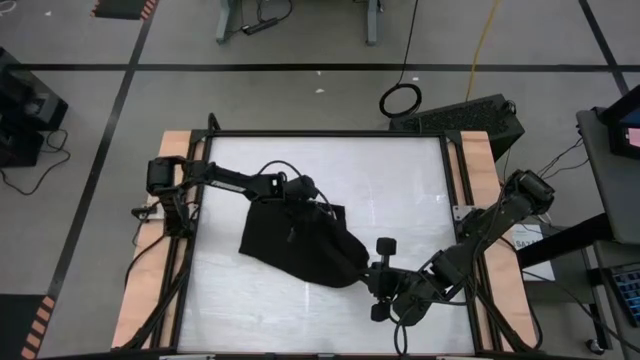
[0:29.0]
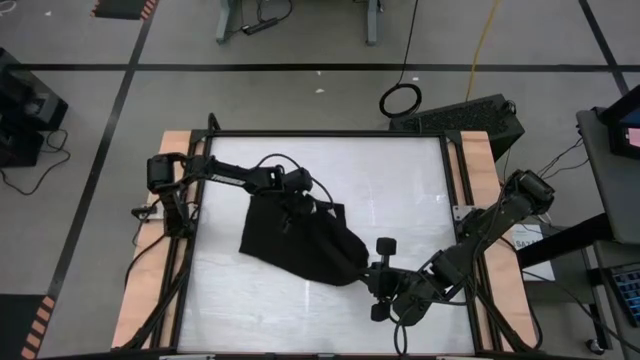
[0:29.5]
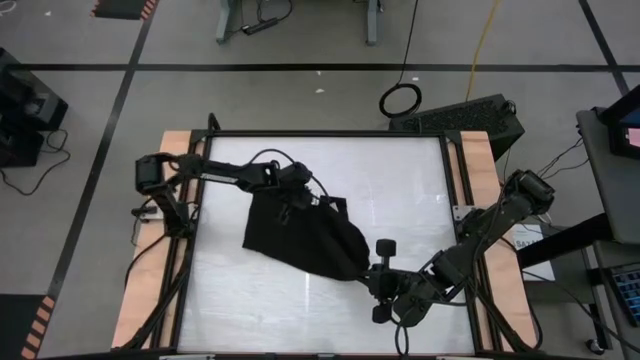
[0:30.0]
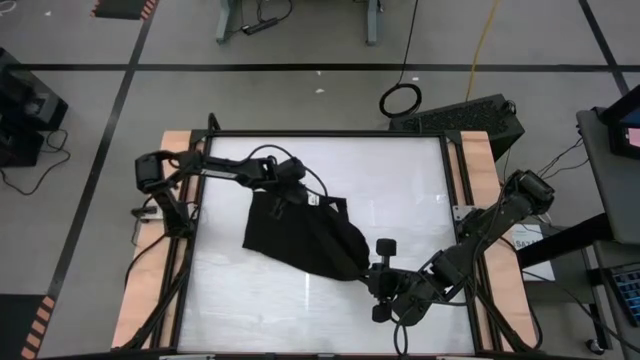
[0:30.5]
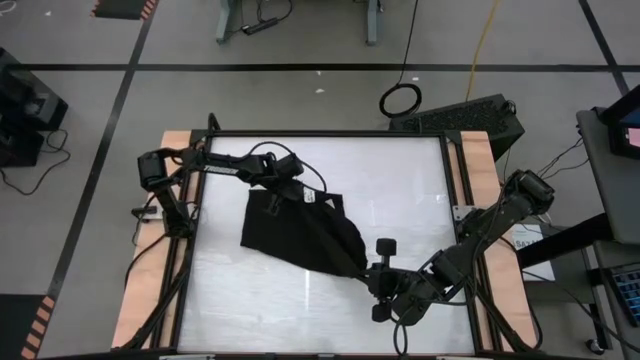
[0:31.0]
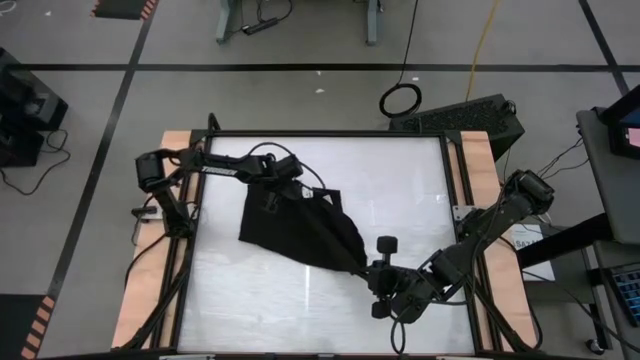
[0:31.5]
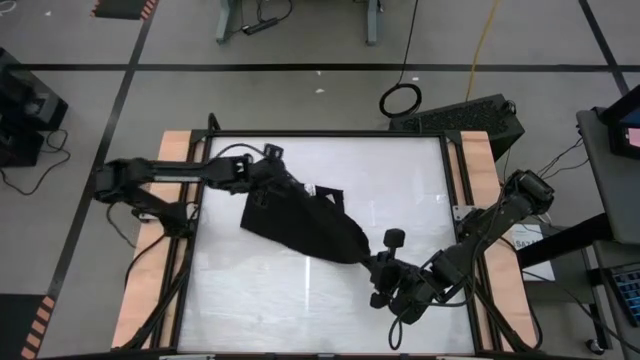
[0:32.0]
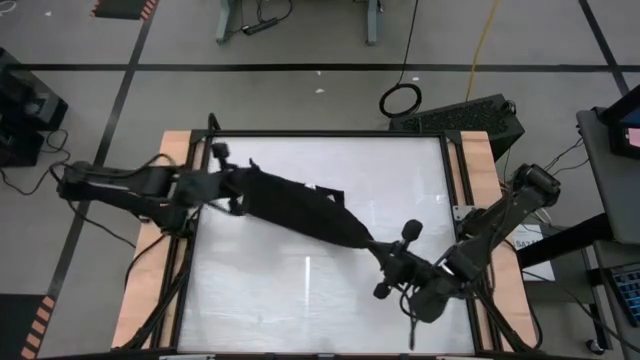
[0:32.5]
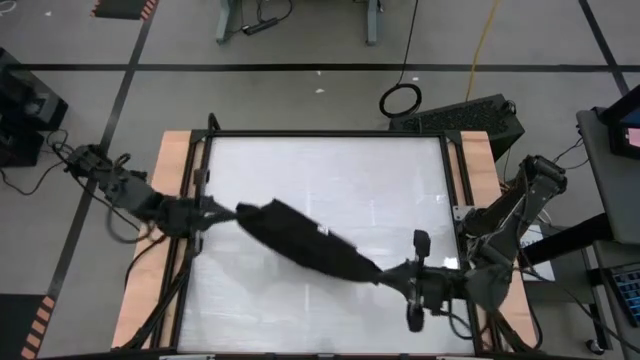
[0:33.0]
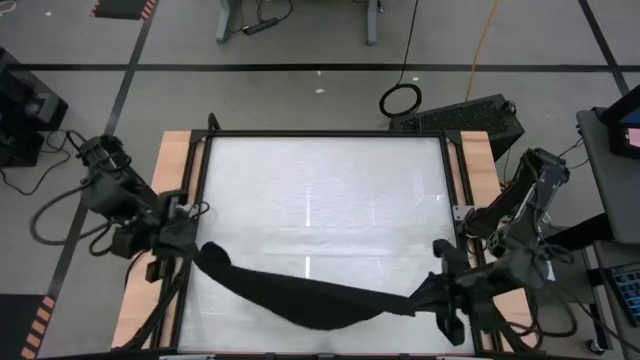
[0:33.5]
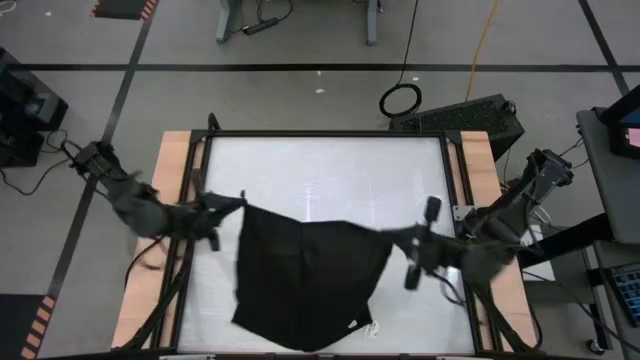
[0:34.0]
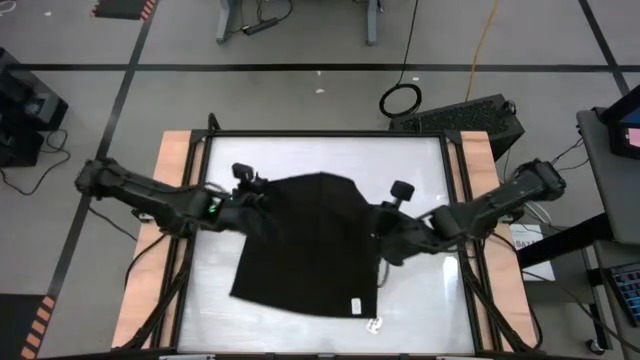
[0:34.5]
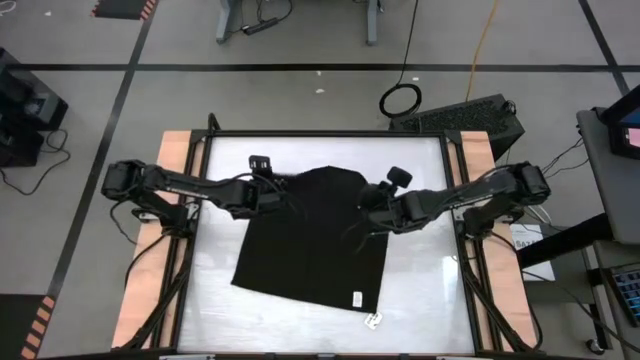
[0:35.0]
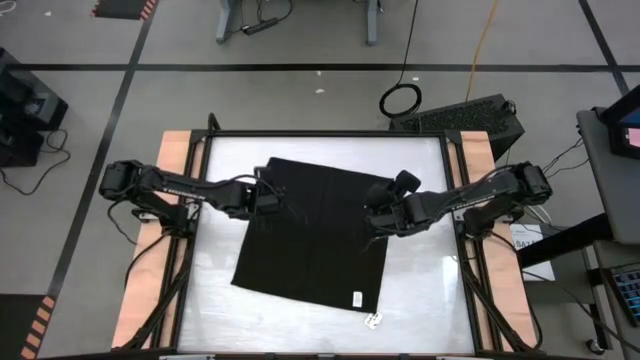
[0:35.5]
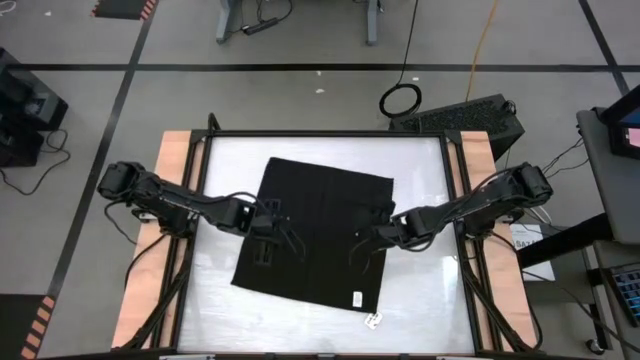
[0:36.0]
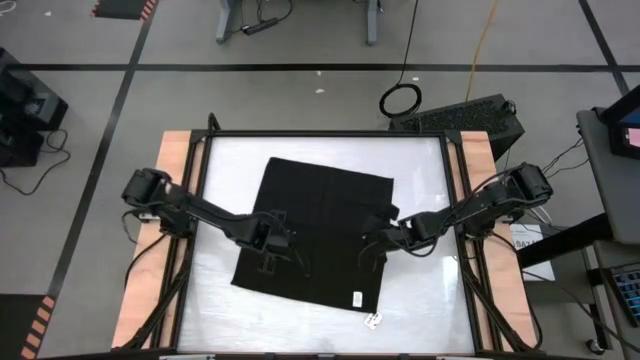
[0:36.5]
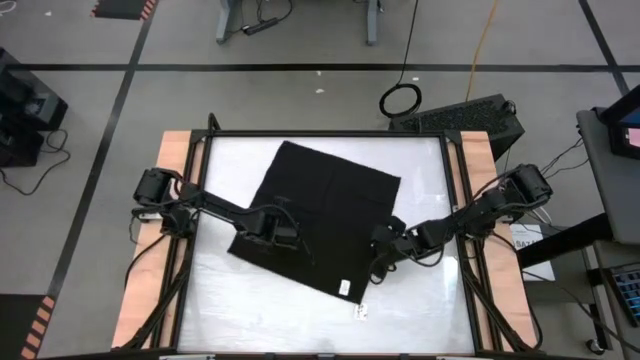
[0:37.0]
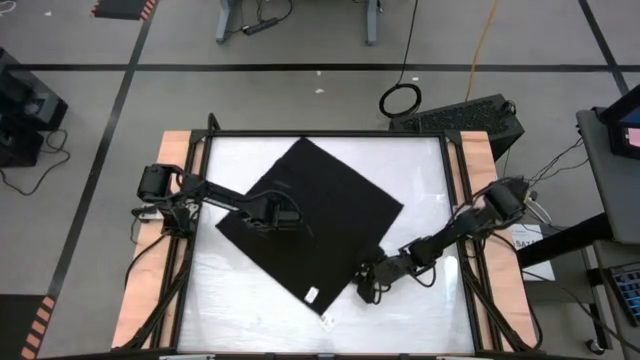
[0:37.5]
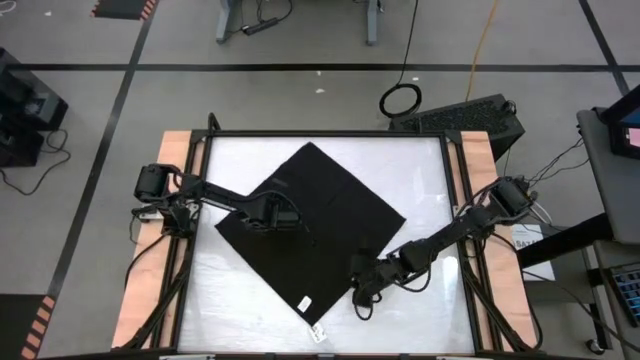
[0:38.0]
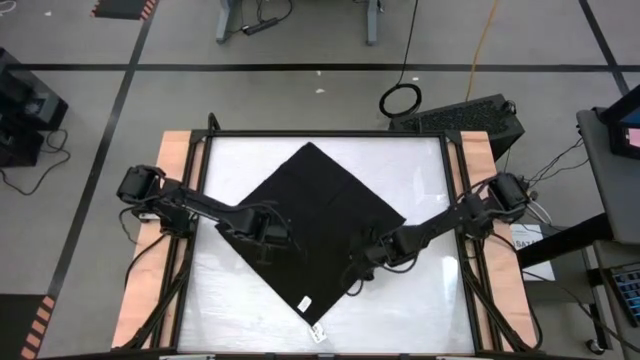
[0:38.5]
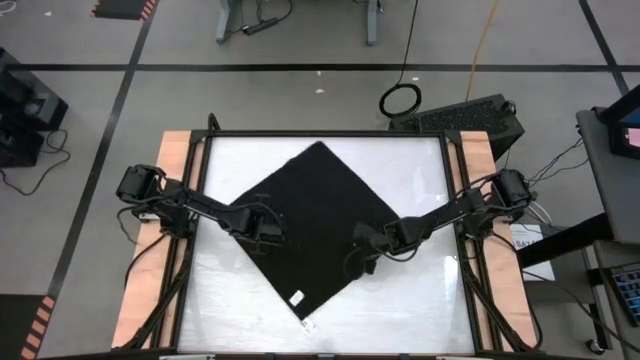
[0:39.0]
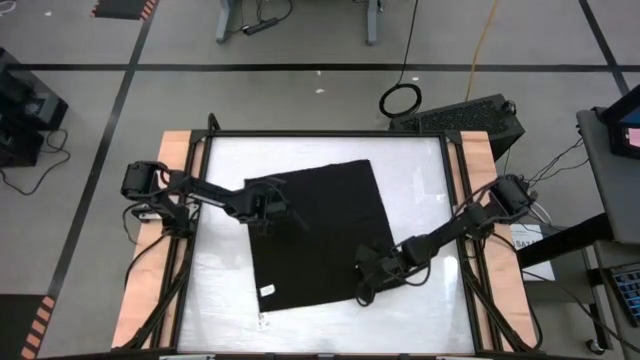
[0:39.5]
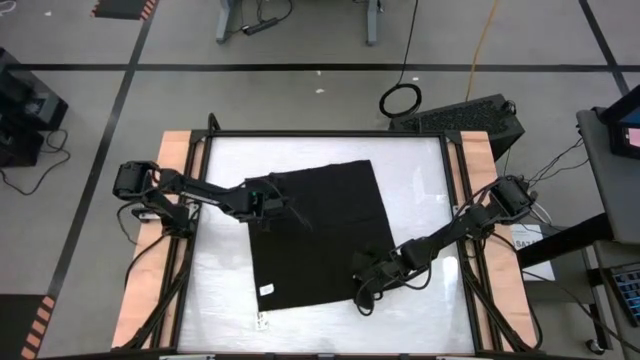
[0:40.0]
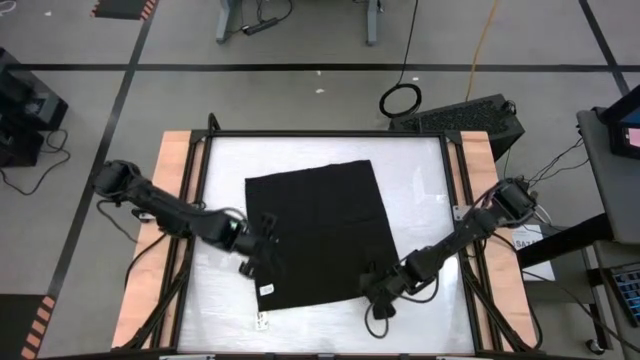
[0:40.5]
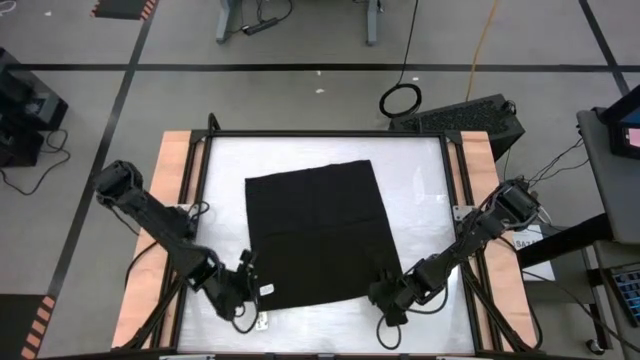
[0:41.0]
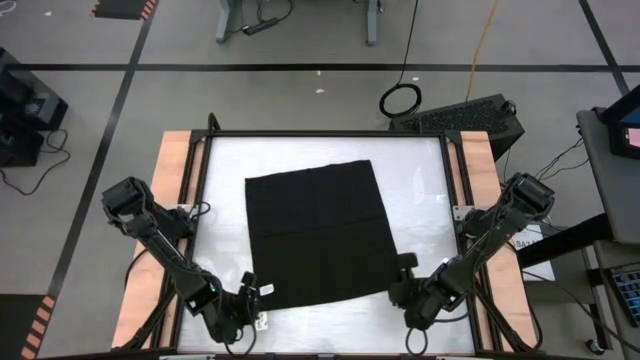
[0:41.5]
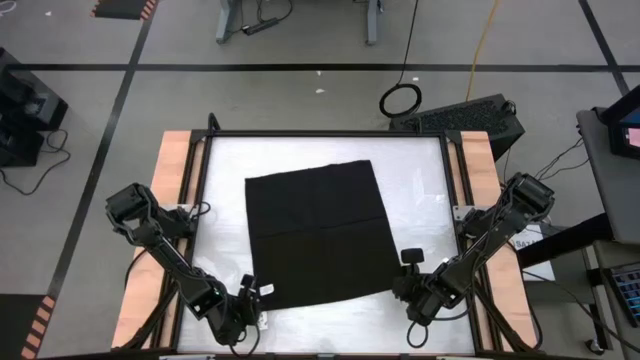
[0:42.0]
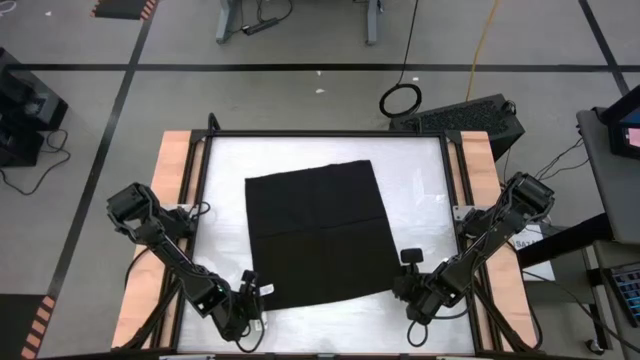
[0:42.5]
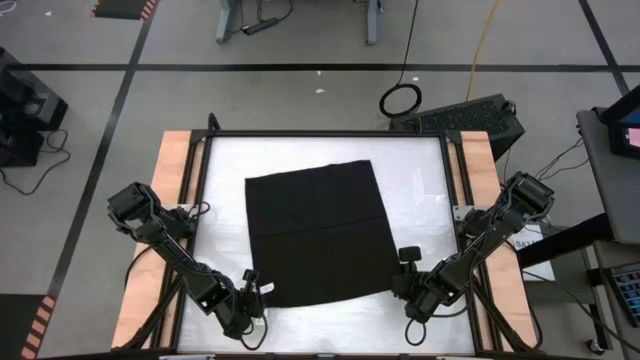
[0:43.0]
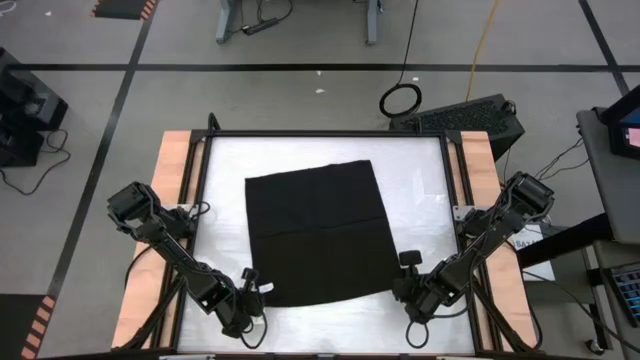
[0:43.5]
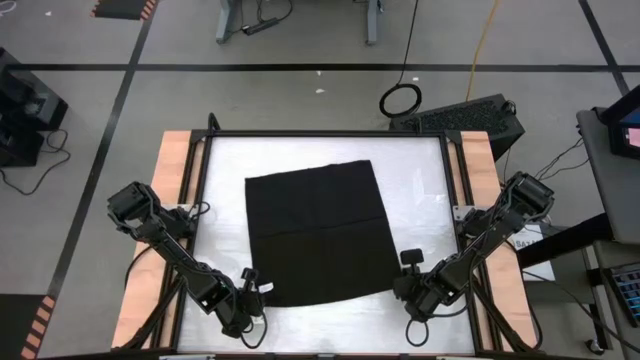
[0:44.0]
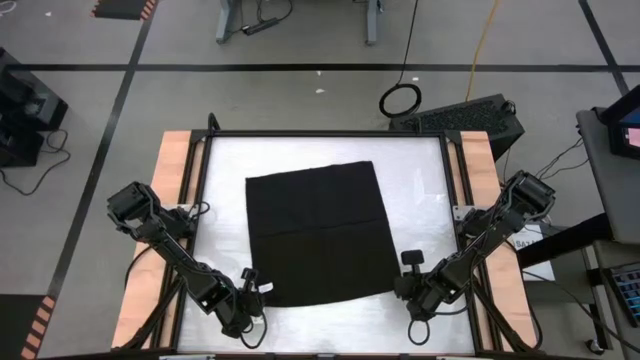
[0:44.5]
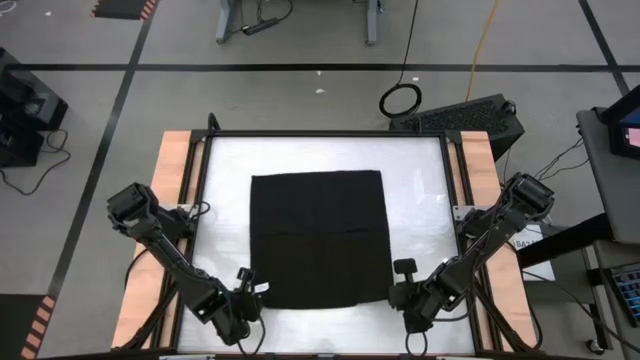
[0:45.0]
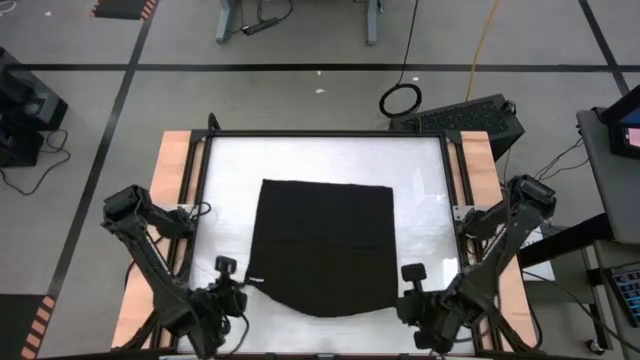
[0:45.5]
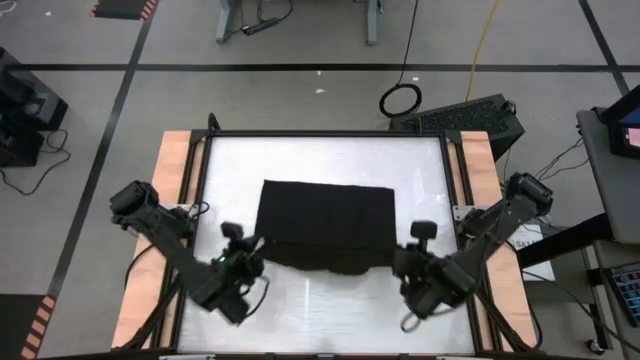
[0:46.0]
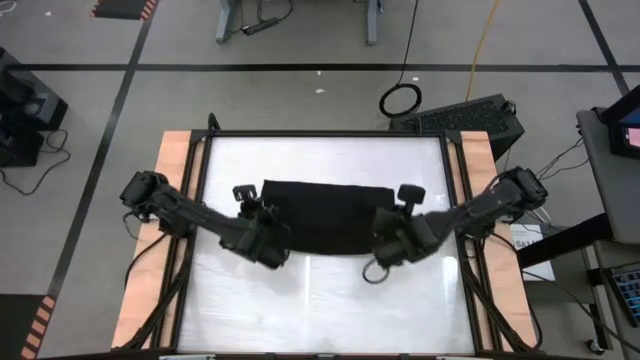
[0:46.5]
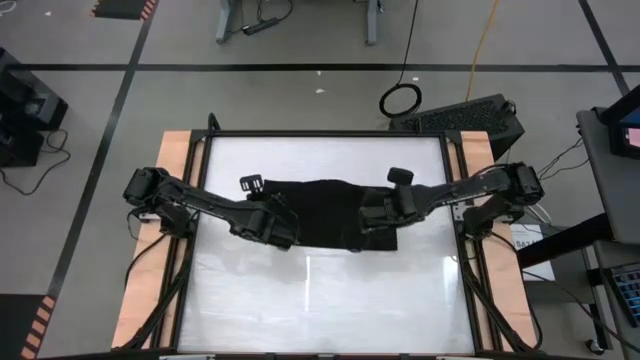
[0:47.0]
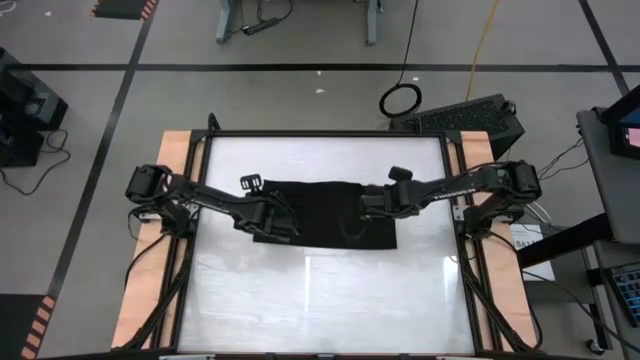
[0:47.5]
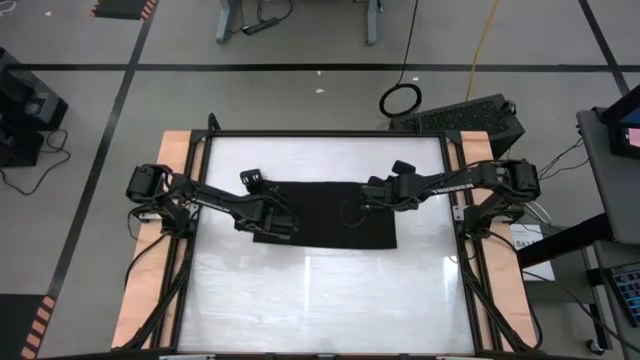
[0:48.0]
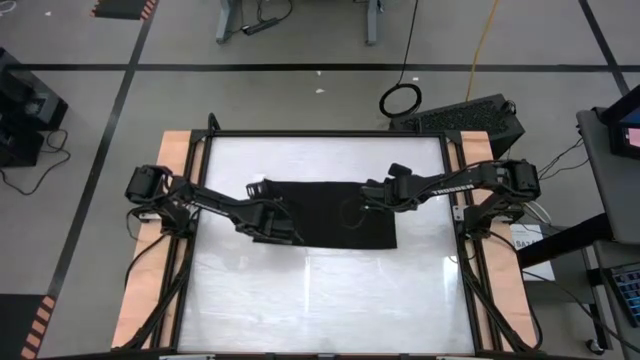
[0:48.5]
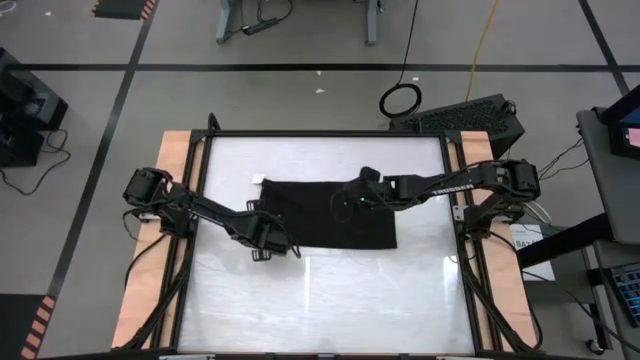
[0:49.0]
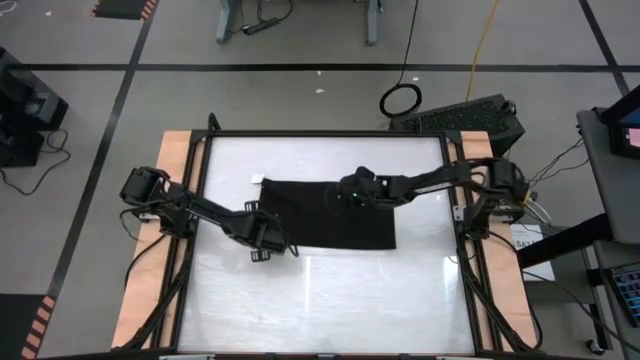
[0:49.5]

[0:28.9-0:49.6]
Task: Roll towel
Roll the black towel
